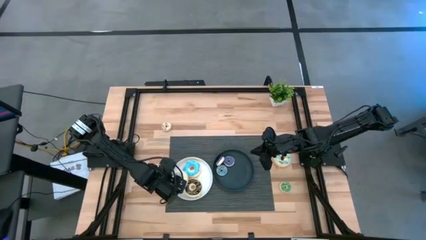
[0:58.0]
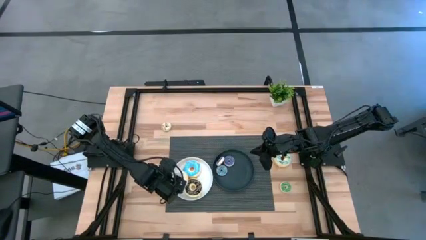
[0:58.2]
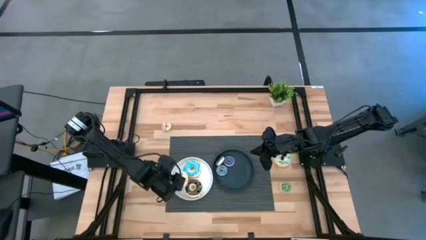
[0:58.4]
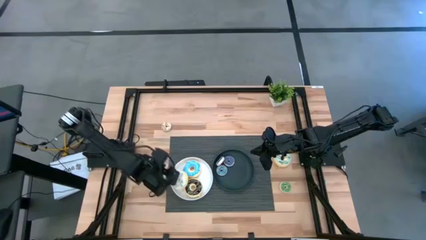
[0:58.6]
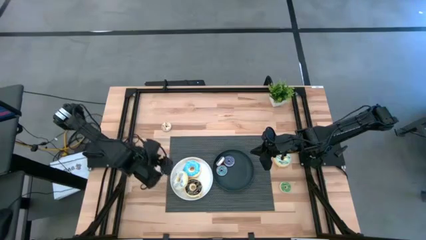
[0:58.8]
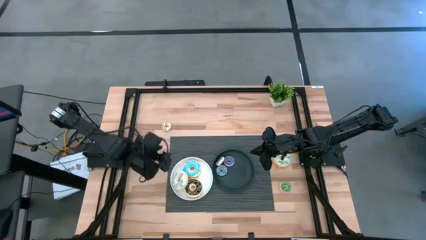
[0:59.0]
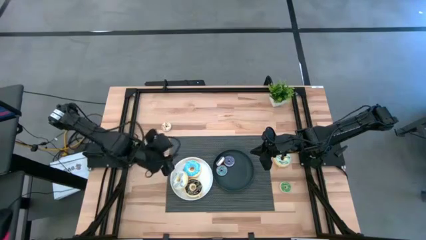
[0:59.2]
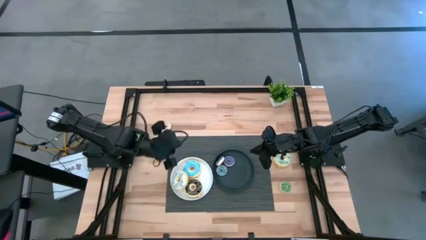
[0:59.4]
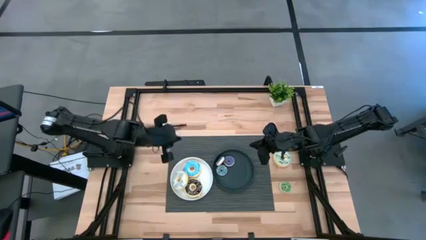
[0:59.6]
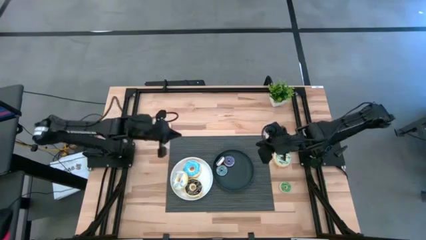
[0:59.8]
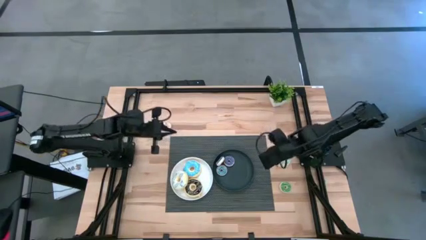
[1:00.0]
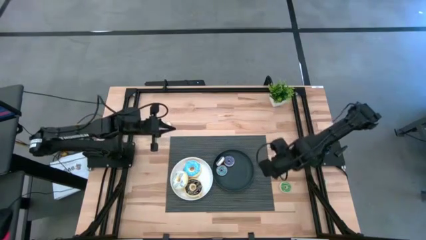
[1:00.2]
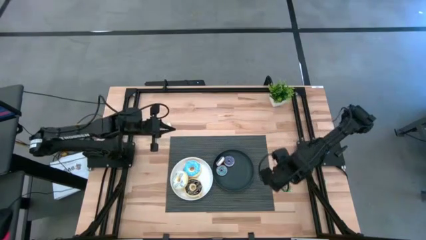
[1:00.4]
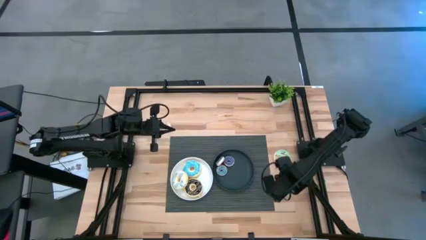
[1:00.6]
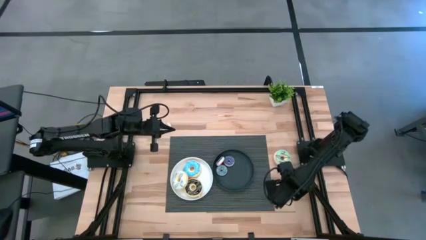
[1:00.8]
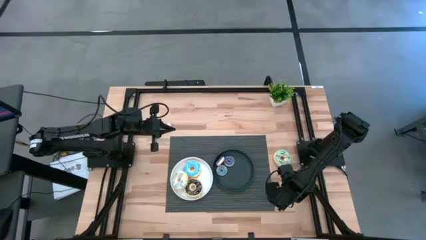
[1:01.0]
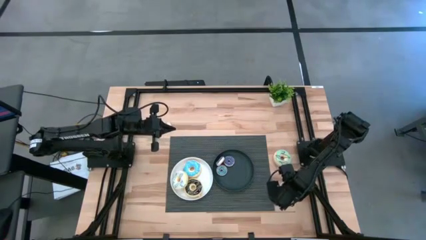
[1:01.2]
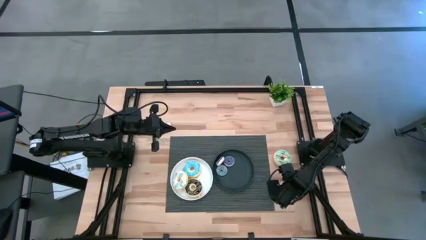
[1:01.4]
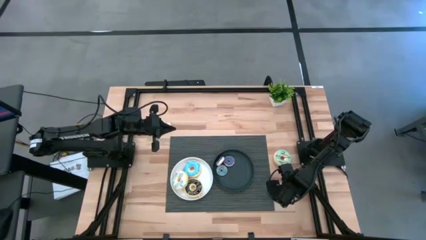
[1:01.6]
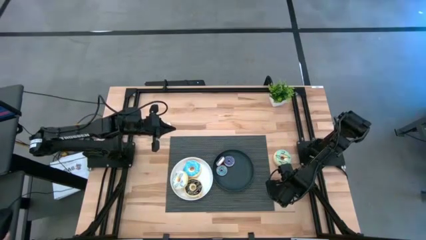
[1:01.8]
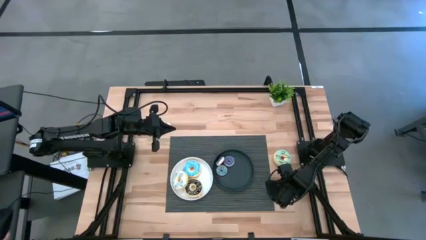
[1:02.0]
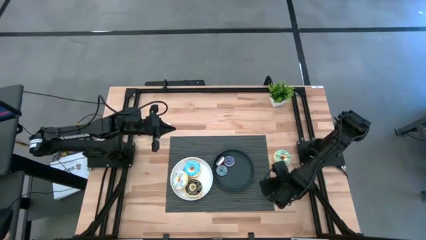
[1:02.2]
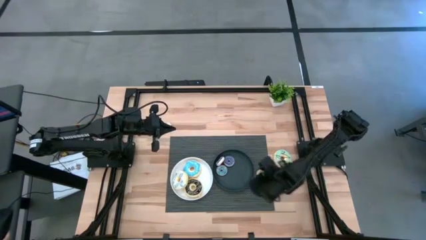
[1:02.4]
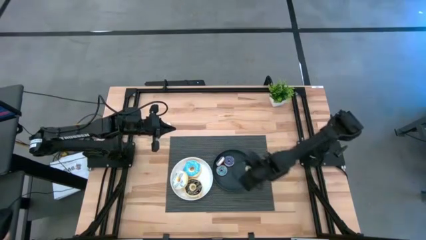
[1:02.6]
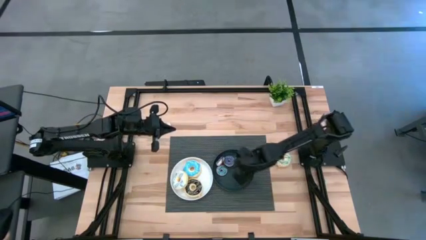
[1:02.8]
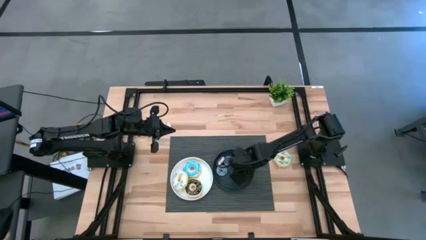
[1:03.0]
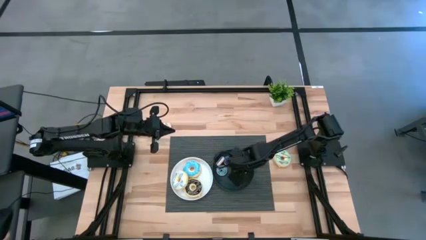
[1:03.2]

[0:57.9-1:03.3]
Task: Pick & Place donuts
Put the small green donut on the black plate

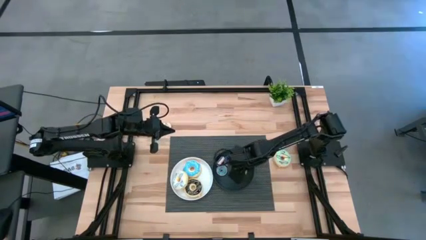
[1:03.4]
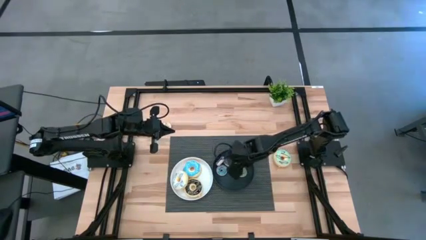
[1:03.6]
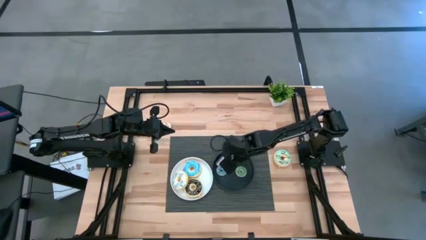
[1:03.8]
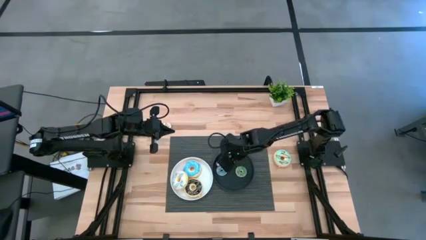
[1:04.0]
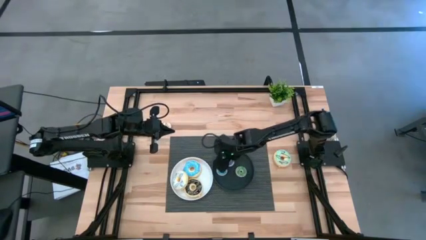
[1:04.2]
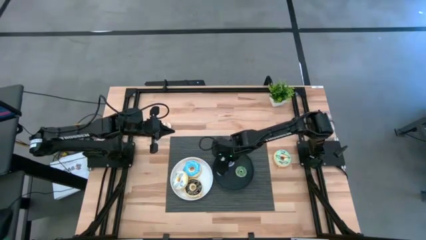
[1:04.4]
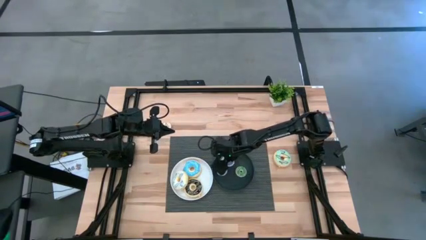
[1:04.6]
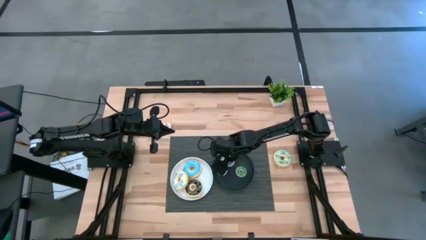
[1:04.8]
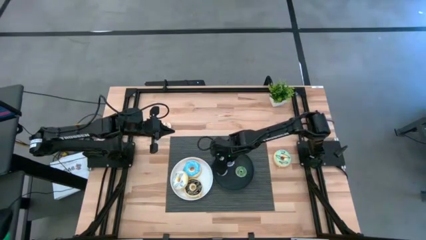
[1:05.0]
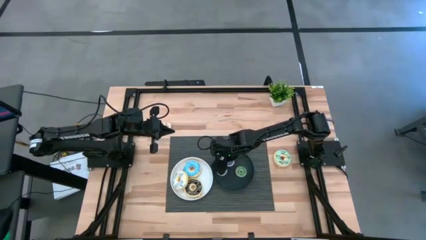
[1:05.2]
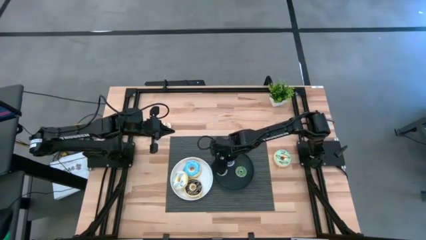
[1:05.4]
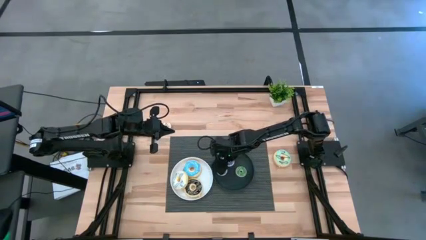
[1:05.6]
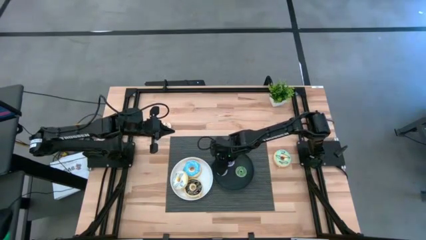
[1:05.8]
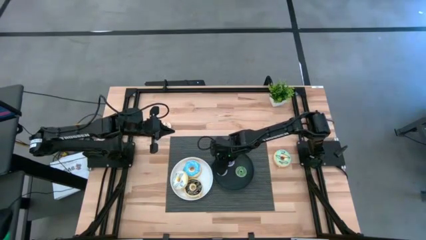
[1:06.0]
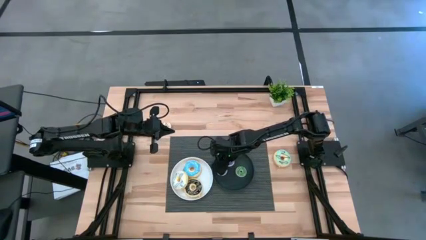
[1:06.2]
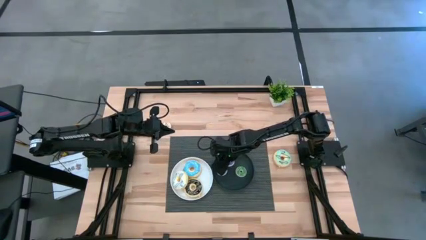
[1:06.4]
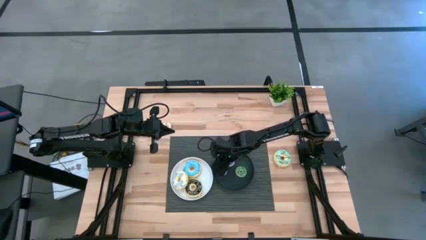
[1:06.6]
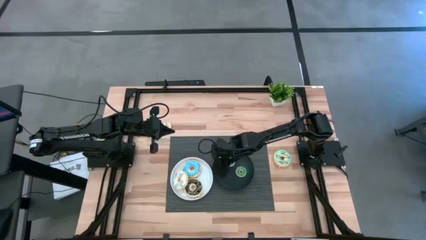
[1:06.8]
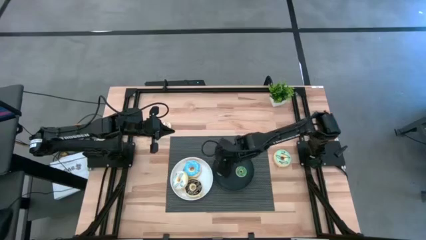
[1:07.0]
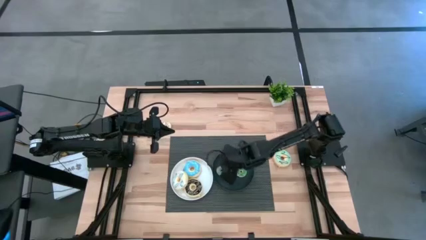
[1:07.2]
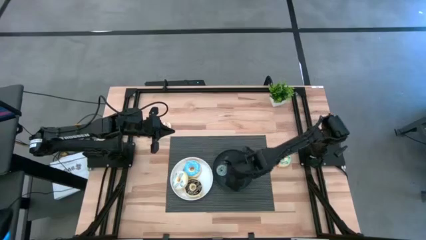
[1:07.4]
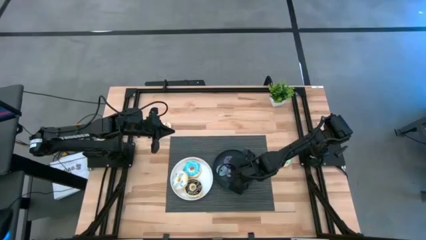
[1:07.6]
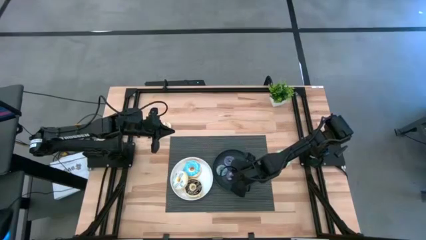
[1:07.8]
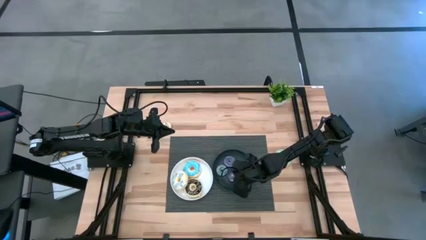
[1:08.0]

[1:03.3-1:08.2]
Adjust the small purple donut on the black plate

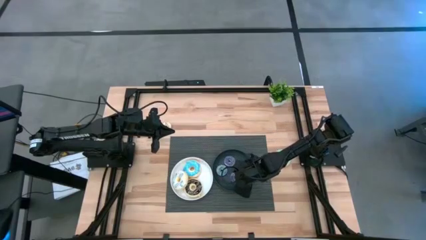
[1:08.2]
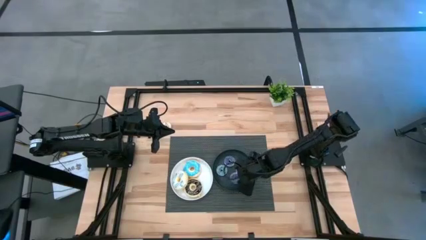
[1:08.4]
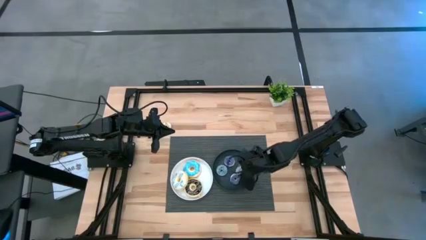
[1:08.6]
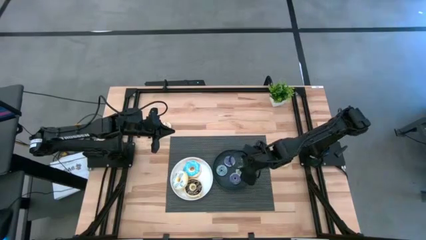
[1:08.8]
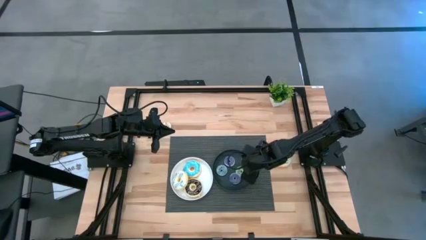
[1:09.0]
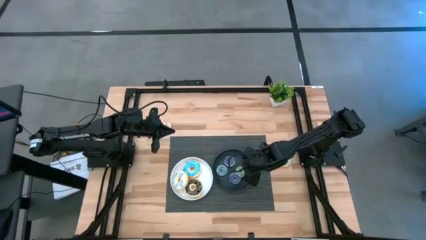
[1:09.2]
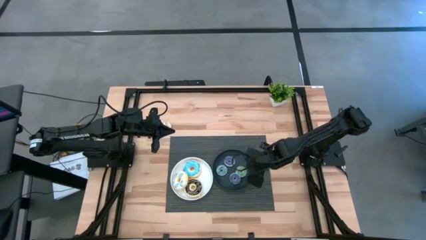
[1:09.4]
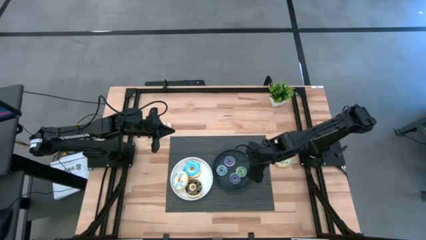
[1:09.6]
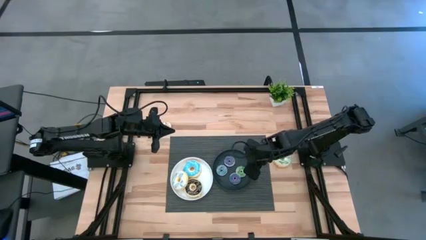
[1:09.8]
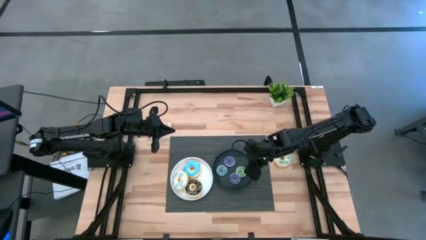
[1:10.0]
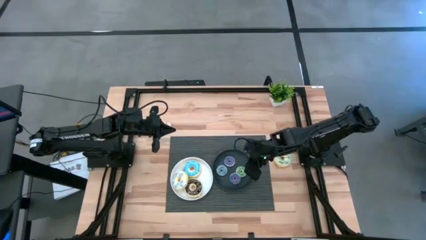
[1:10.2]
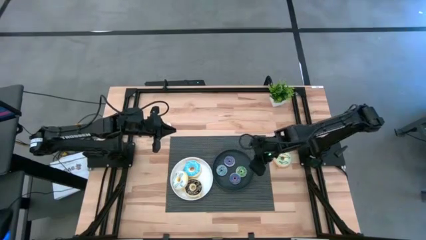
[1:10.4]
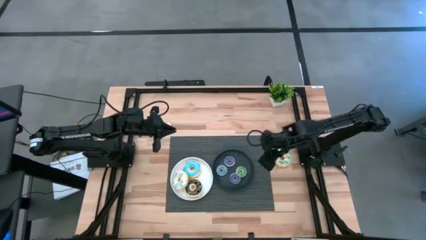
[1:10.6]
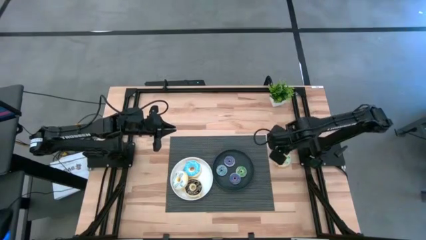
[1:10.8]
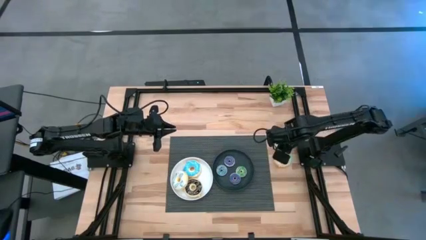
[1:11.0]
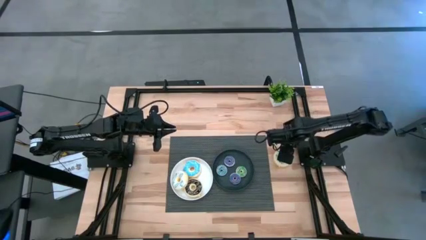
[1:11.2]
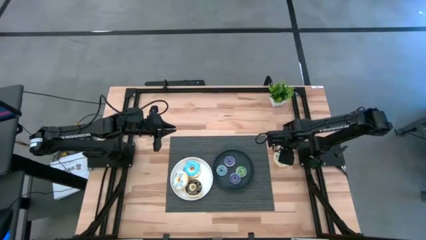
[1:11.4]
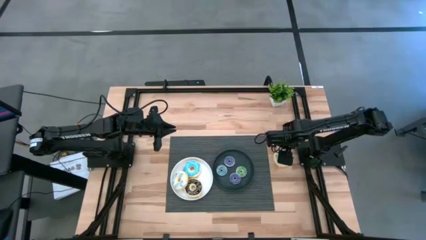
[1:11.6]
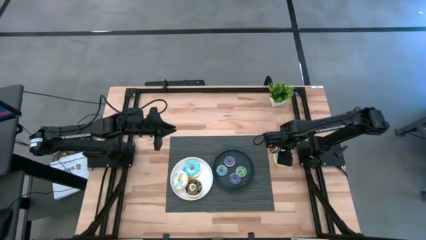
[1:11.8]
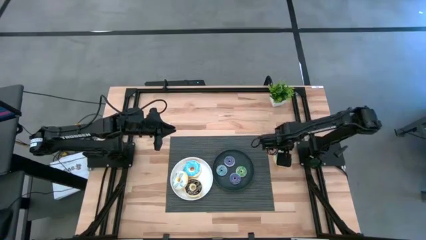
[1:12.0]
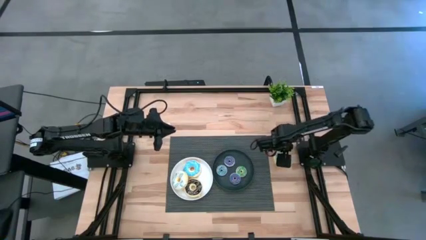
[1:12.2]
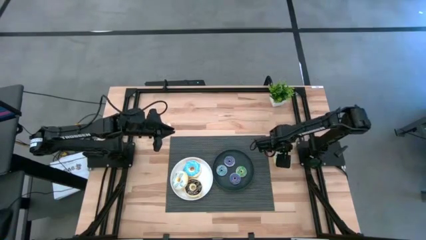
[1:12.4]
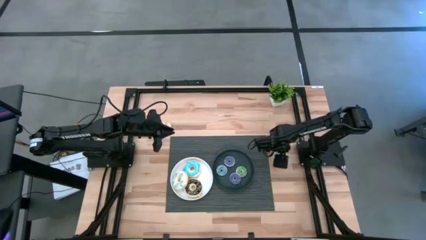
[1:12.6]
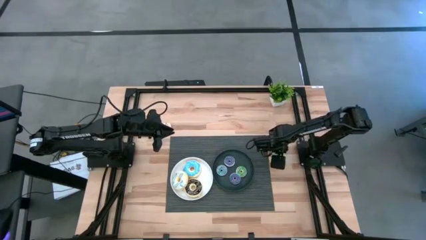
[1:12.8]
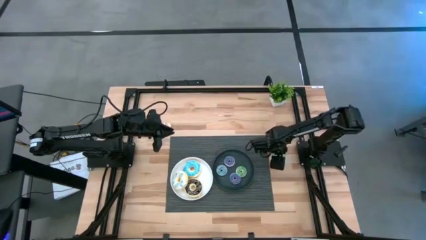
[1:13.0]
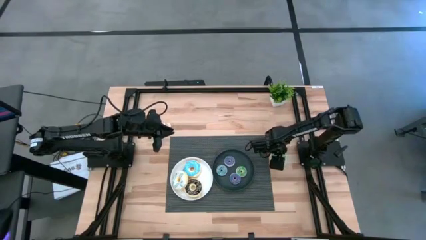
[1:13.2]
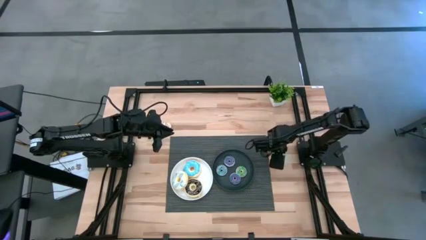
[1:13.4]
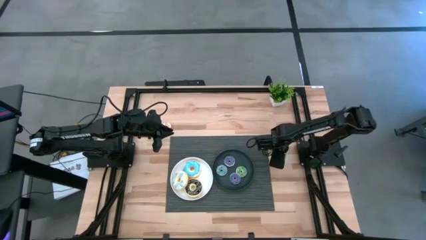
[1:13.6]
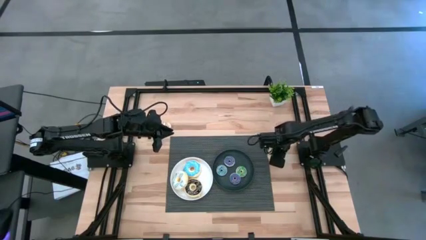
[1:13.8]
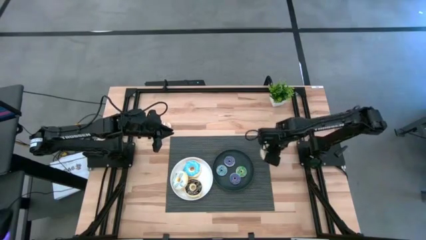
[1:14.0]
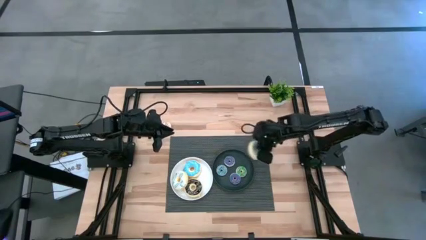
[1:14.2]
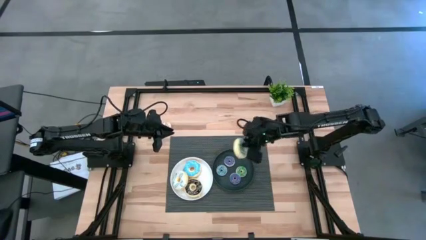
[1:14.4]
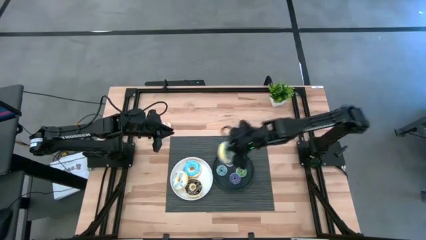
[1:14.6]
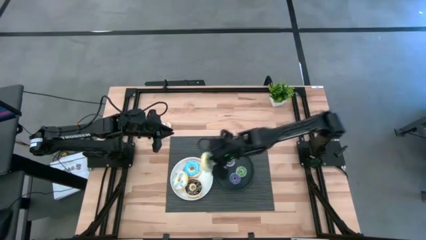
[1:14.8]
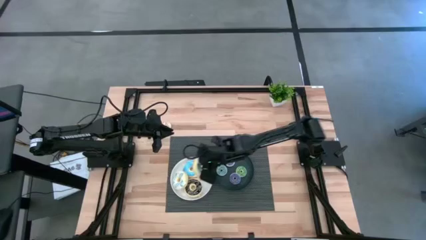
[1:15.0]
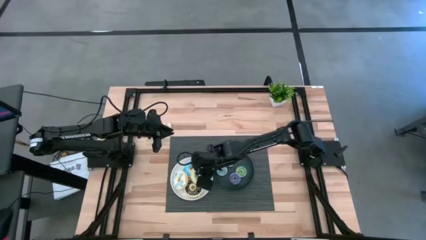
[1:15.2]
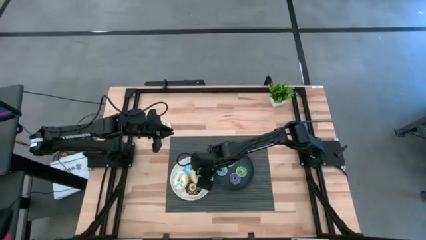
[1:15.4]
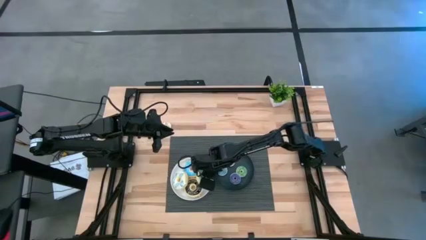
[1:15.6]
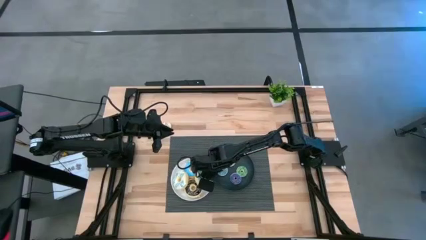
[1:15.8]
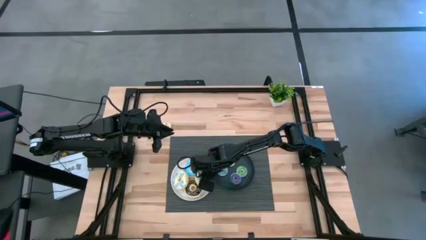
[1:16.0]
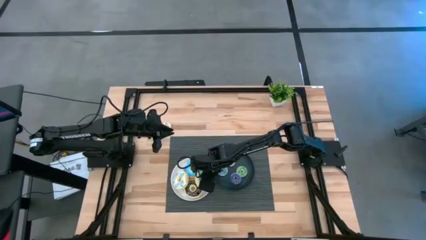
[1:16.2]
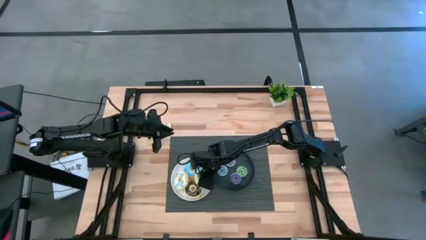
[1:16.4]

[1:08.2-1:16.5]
Put the big green donut on the white plate
